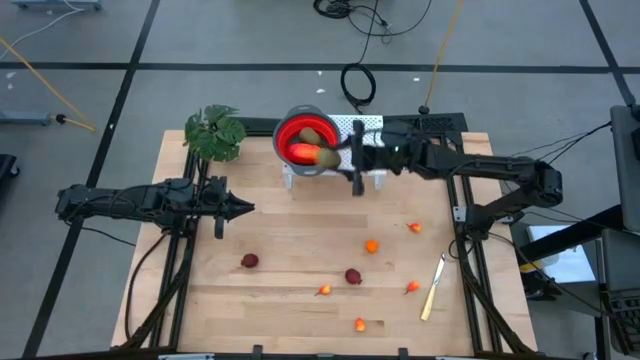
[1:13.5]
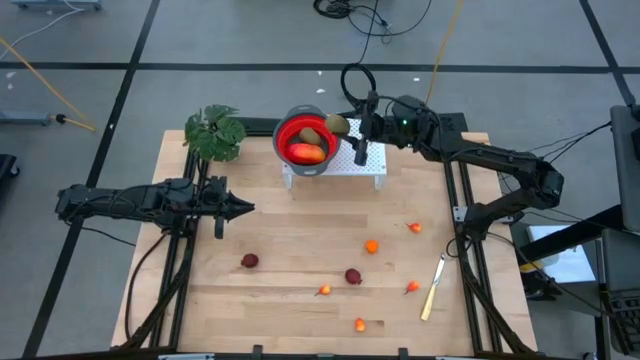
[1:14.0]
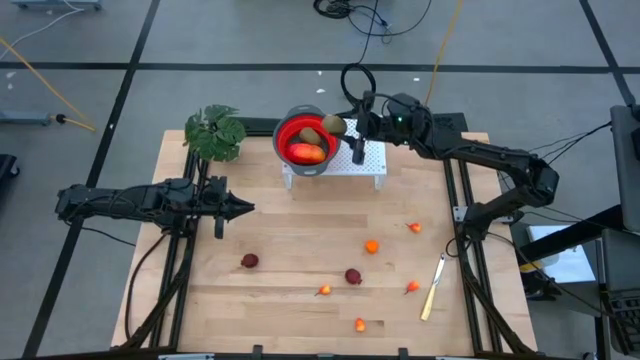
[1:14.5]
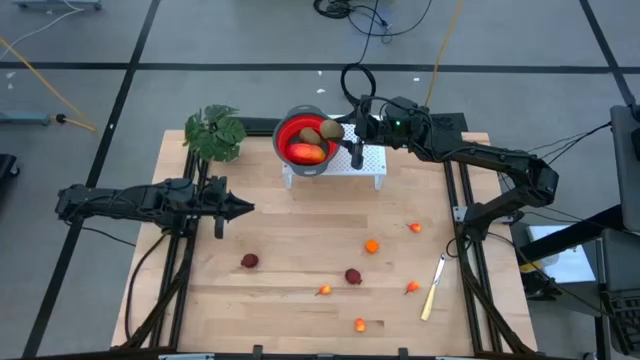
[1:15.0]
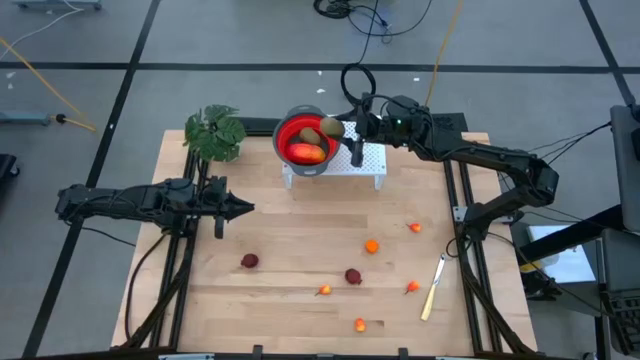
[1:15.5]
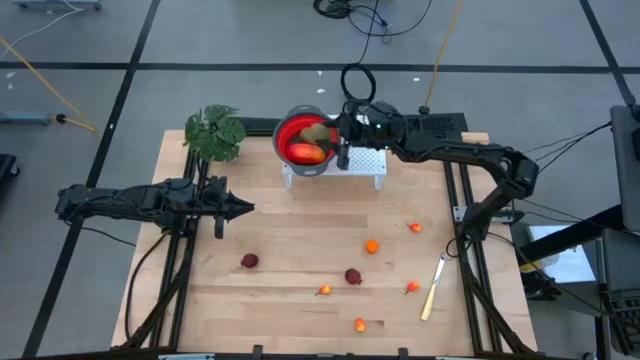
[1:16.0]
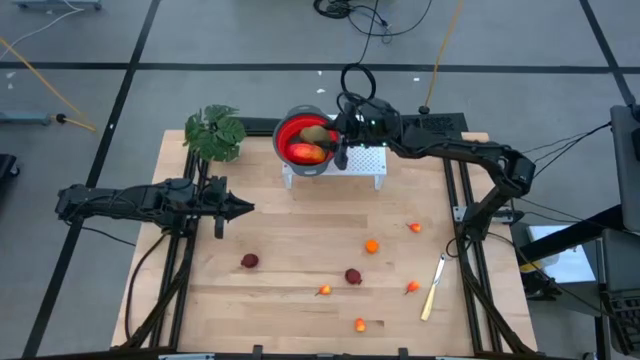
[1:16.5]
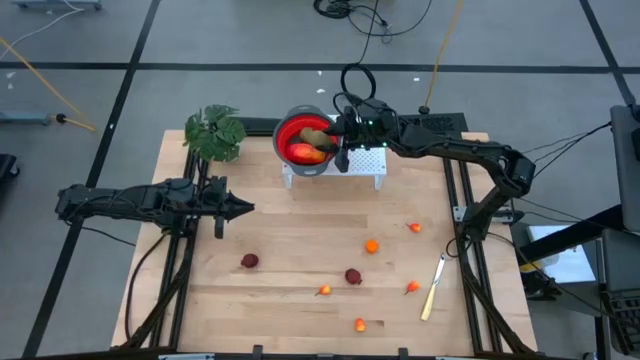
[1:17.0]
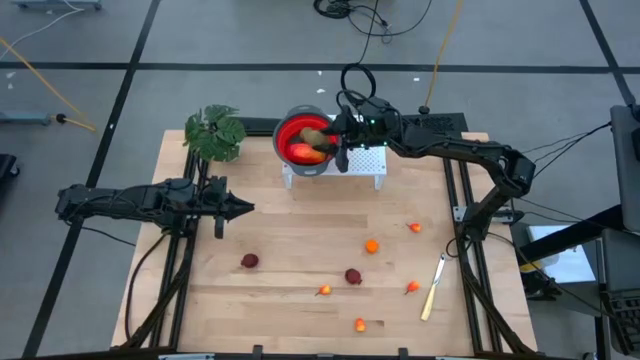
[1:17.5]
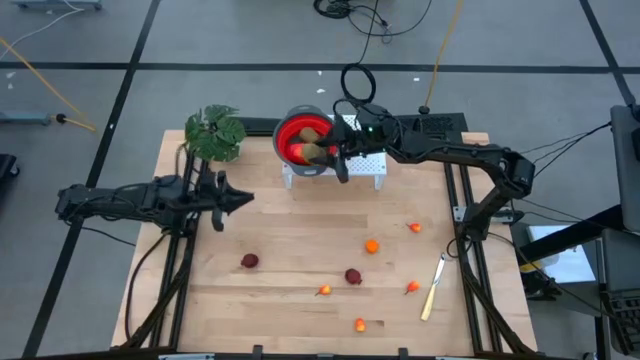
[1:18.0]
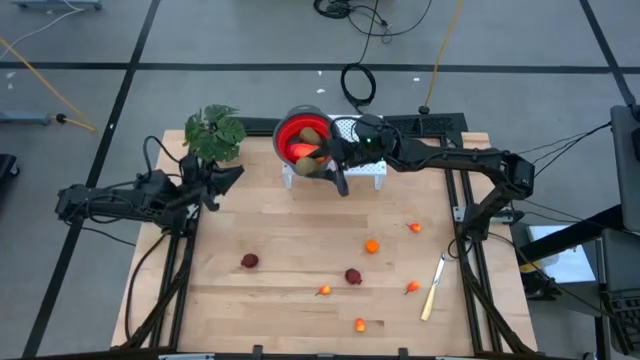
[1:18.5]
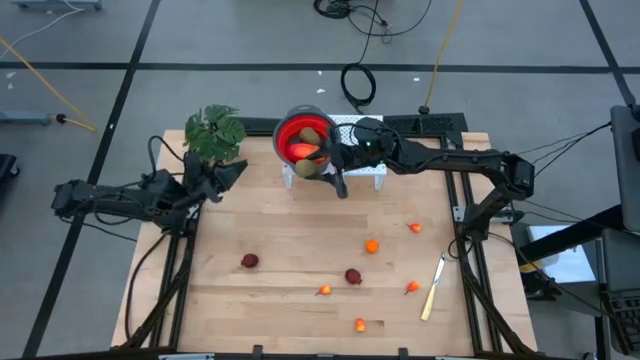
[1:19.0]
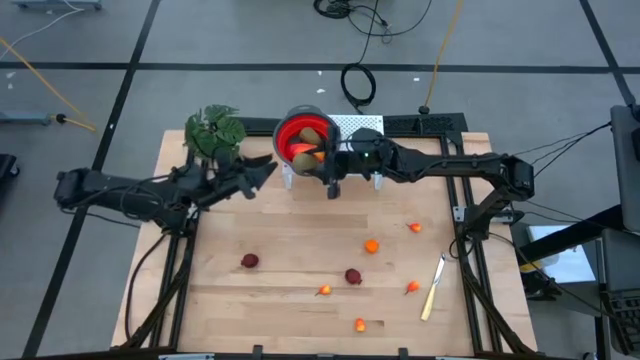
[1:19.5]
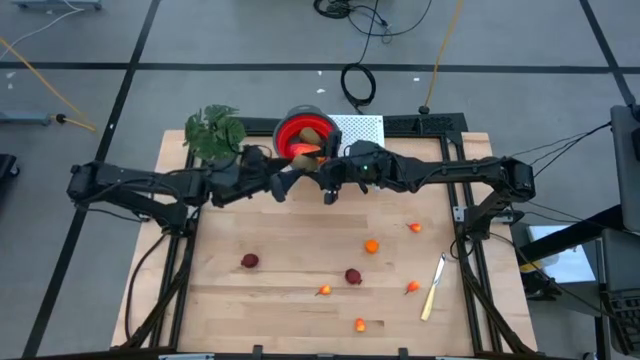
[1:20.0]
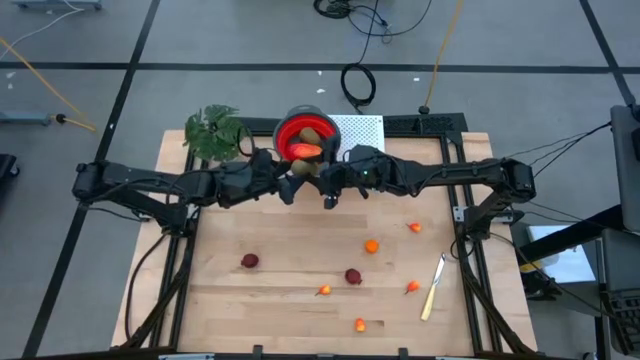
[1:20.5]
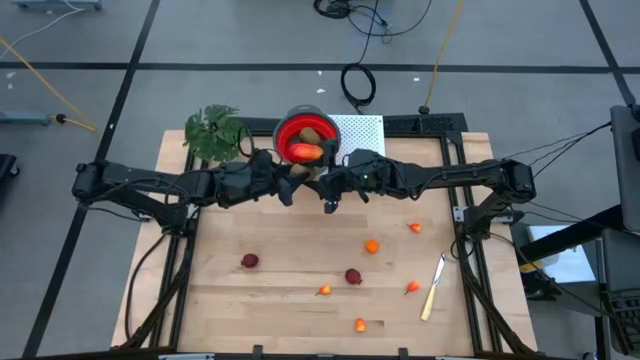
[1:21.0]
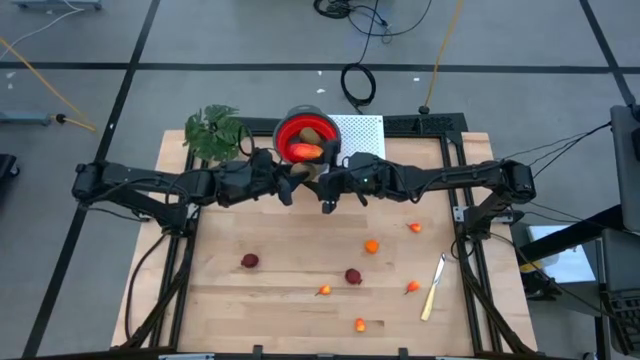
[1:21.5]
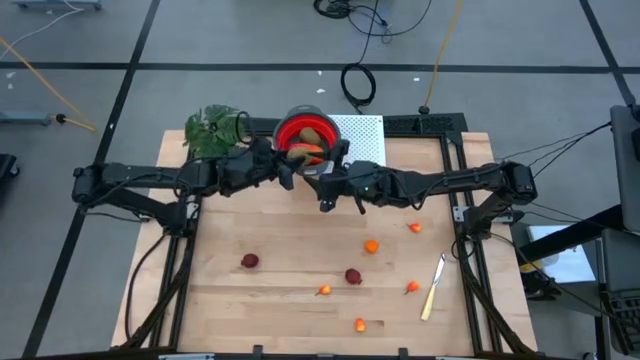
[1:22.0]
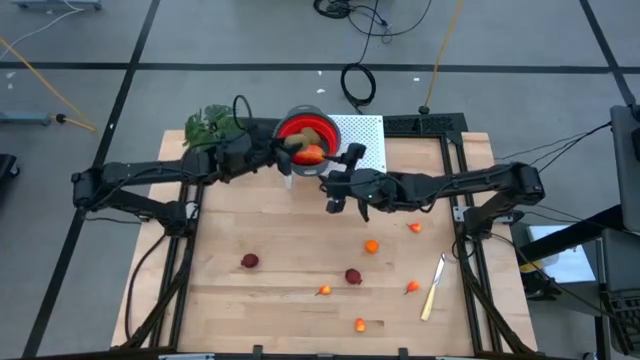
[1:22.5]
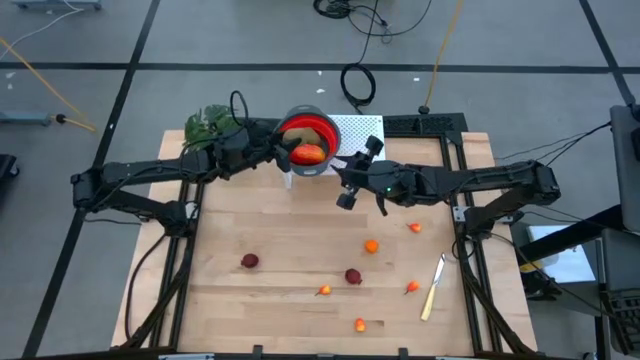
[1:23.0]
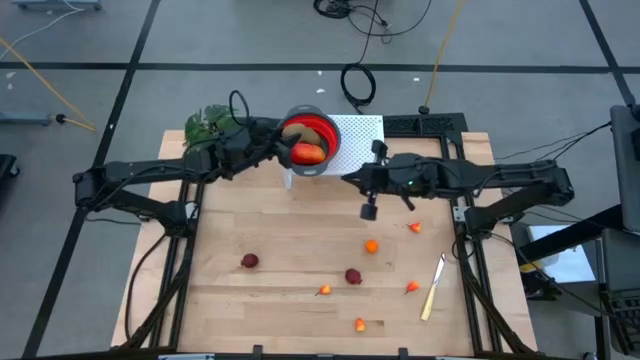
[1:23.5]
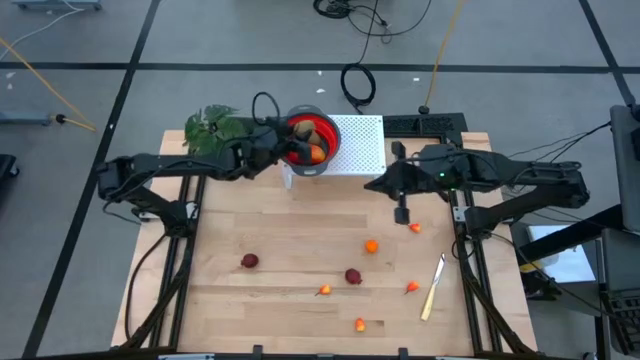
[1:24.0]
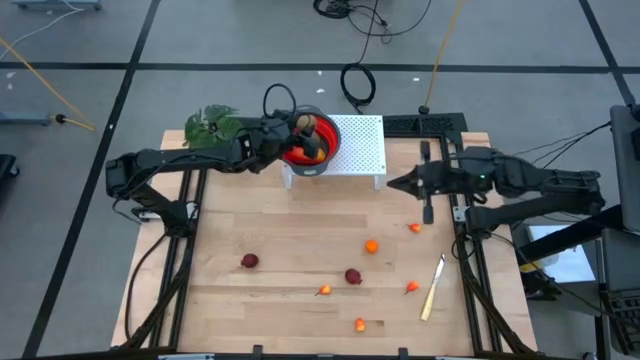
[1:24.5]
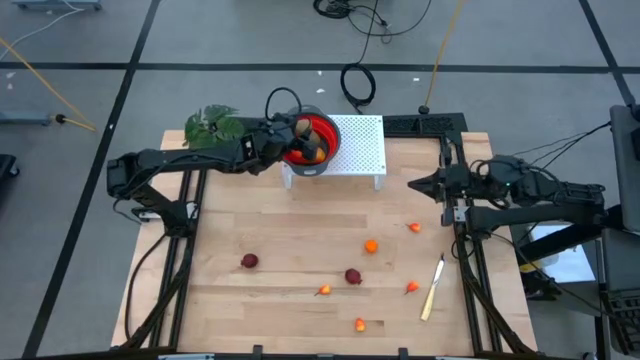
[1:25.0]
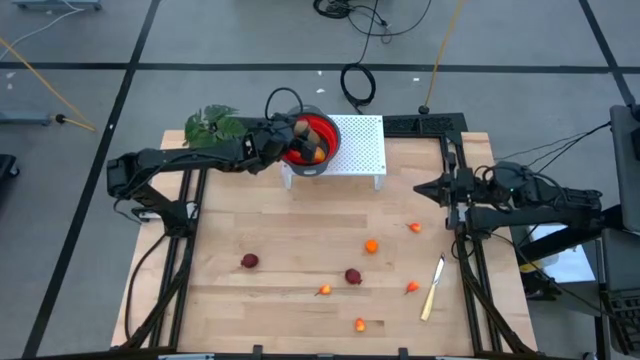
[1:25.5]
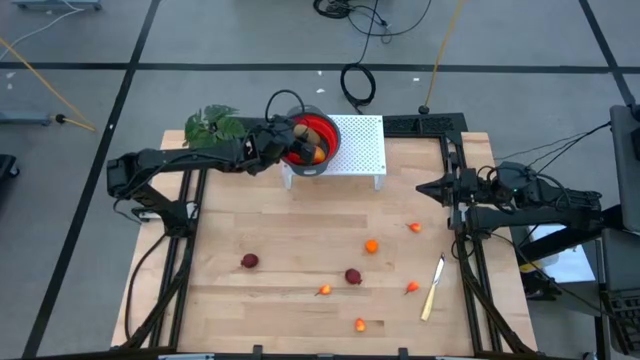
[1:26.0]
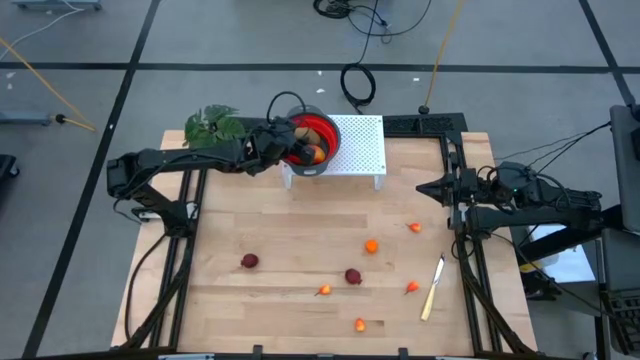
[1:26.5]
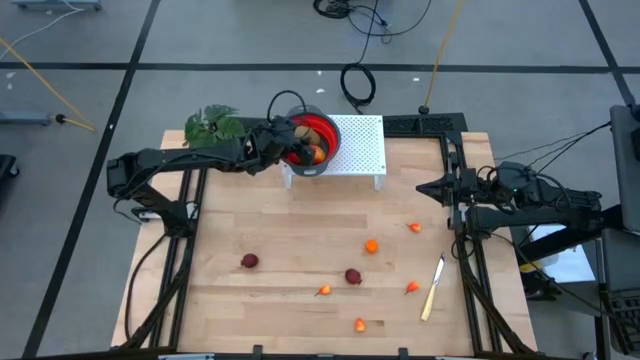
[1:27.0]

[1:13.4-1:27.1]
Task: Pick & Place Fruit
Put the kiwi into the red strainer bowl

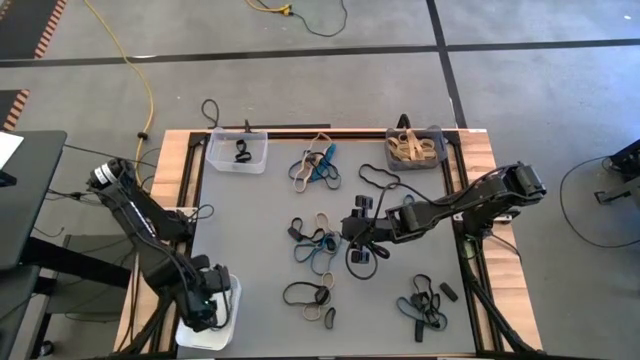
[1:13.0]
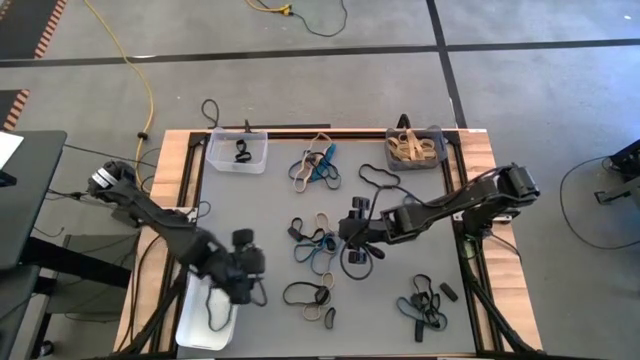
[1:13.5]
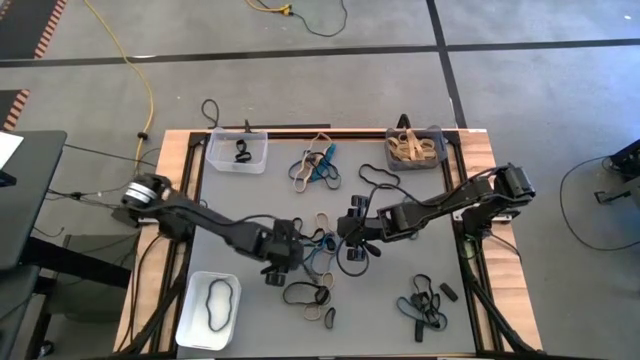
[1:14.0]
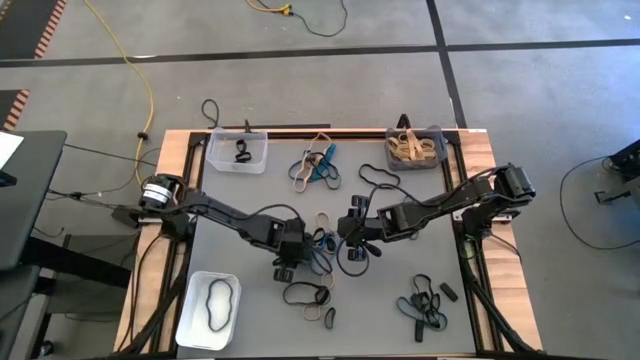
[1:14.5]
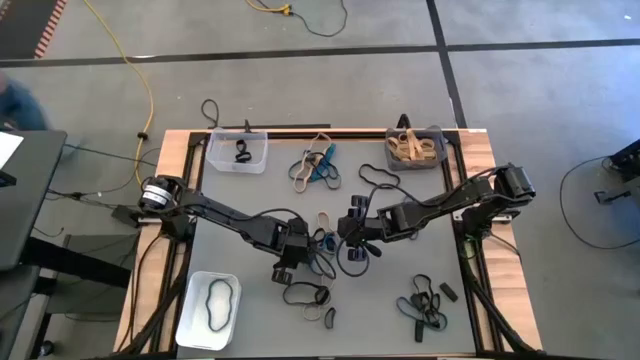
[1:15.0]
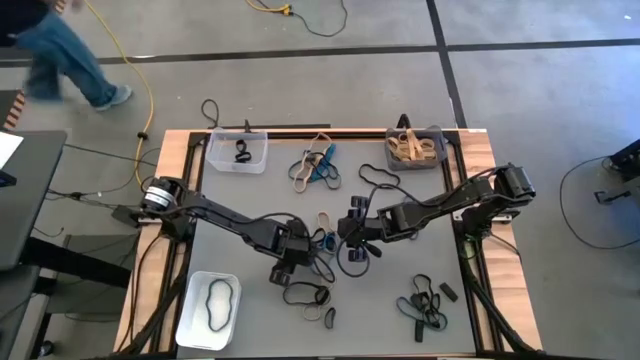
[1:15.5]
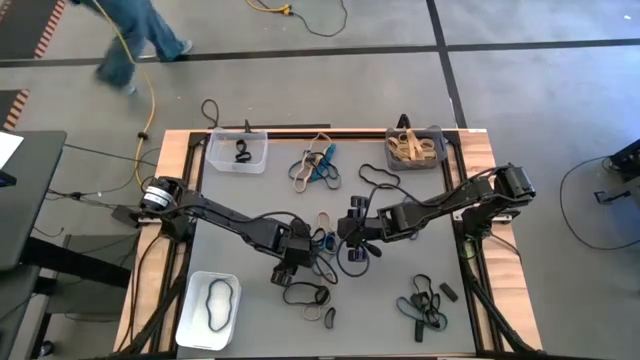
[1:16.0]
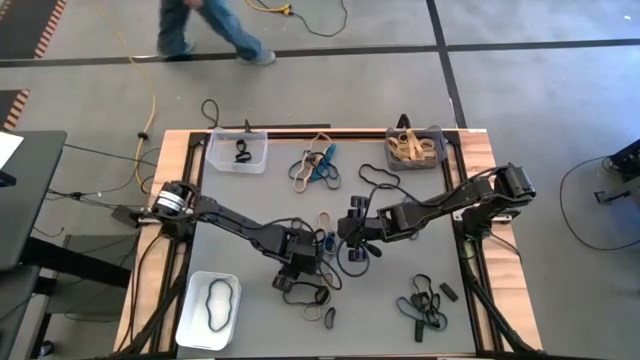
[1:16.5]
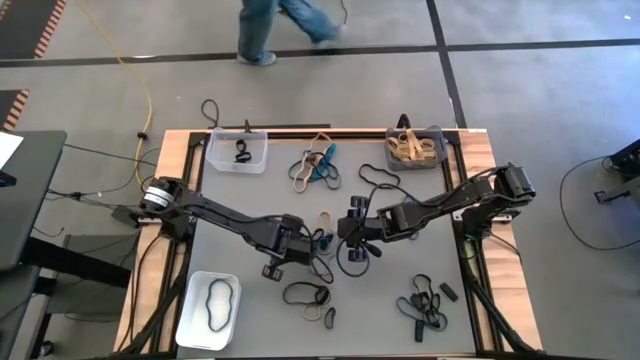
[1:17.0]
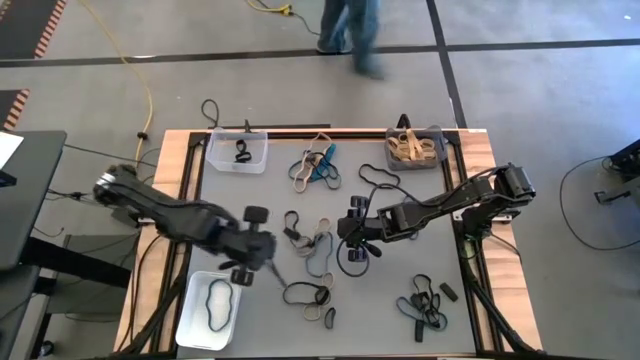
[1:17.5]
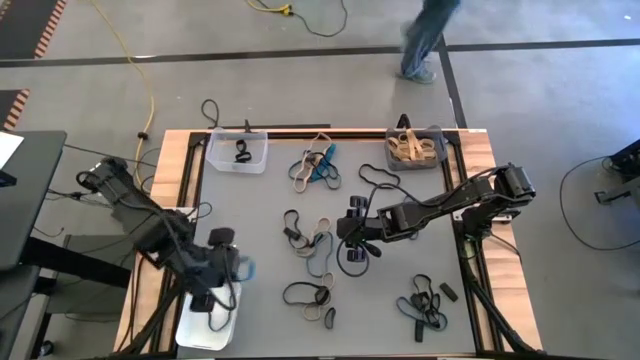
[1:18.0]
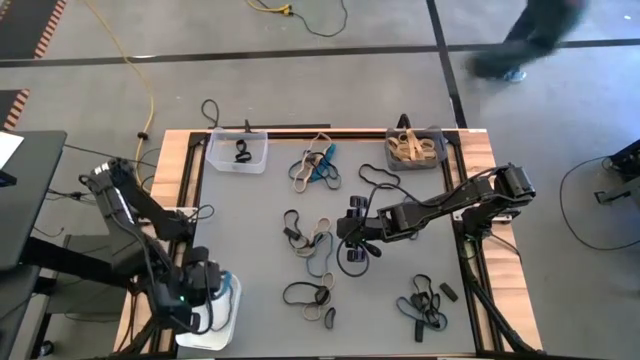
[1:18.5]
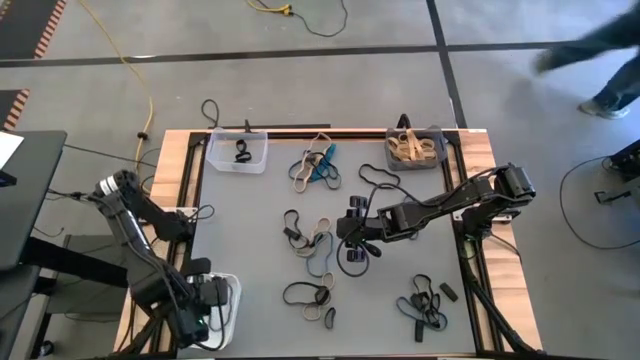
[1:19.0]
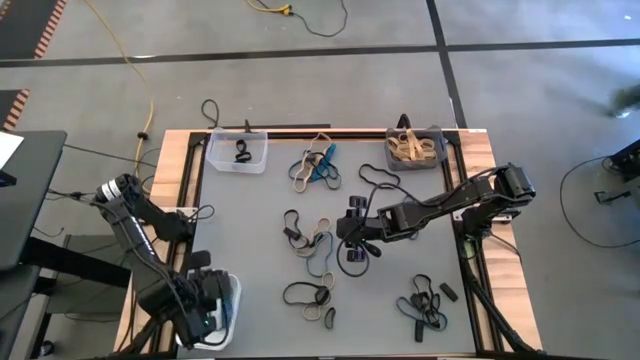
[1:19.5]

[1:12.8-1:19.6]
Task: Sort rubber bands into baskets
Put the blue rubber band into the white bin
